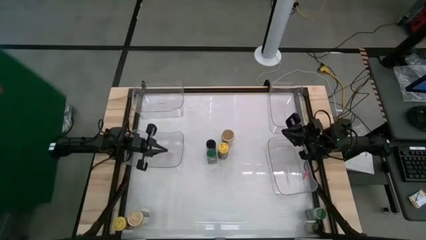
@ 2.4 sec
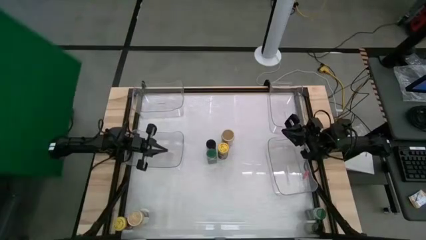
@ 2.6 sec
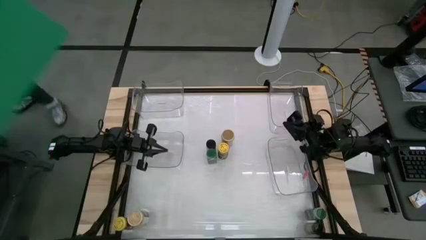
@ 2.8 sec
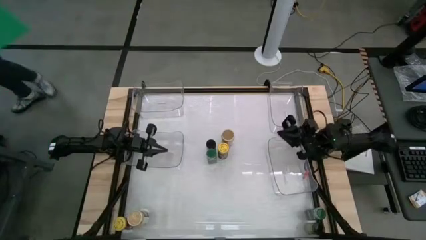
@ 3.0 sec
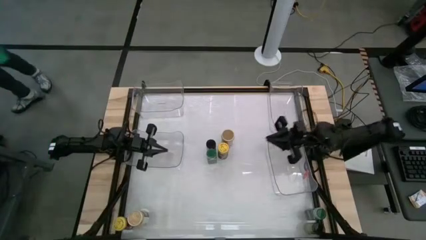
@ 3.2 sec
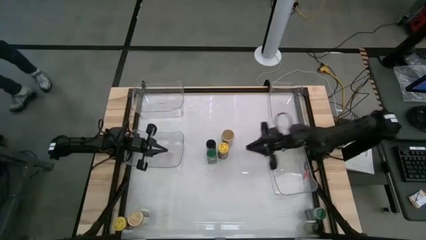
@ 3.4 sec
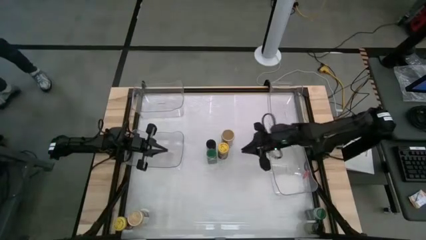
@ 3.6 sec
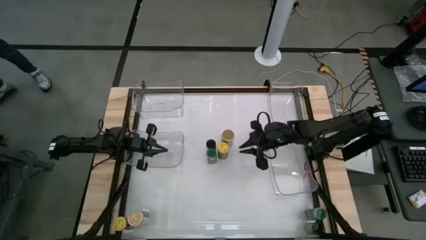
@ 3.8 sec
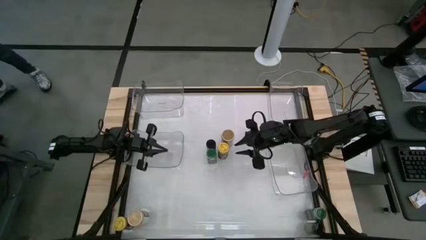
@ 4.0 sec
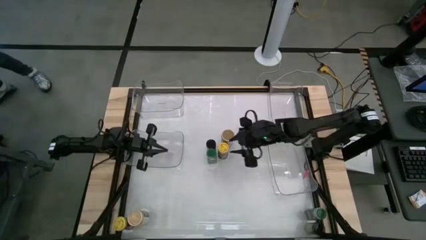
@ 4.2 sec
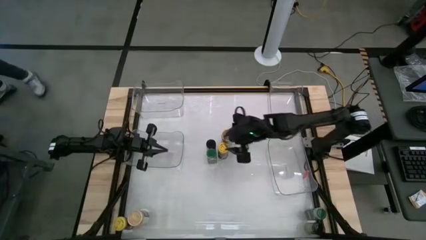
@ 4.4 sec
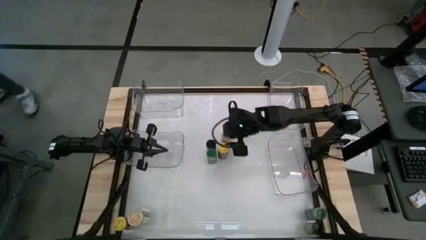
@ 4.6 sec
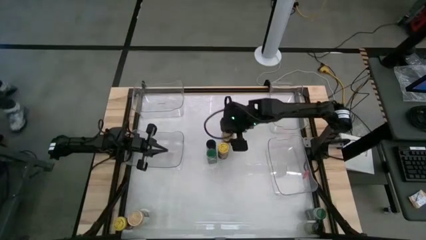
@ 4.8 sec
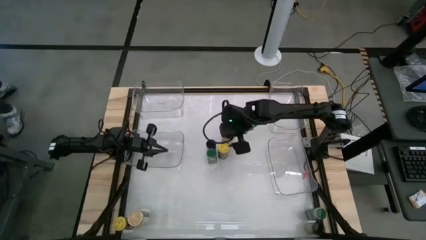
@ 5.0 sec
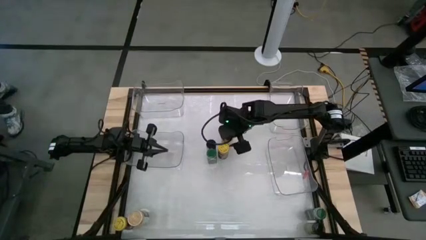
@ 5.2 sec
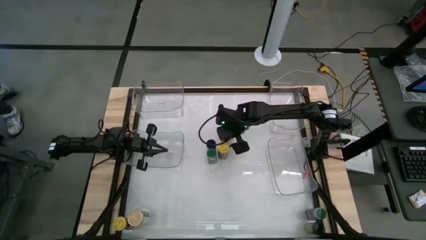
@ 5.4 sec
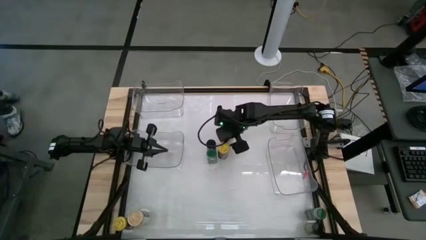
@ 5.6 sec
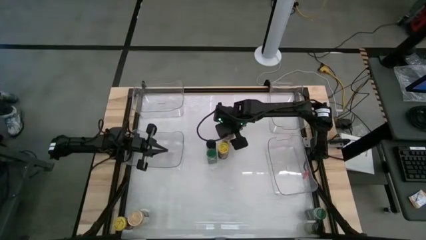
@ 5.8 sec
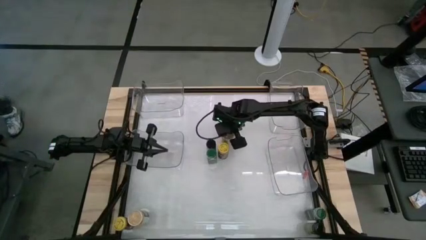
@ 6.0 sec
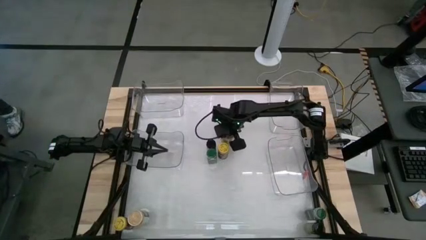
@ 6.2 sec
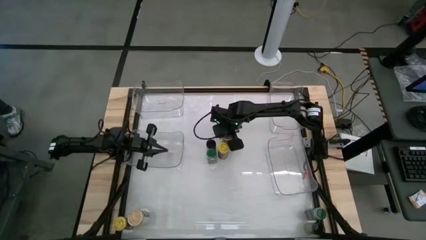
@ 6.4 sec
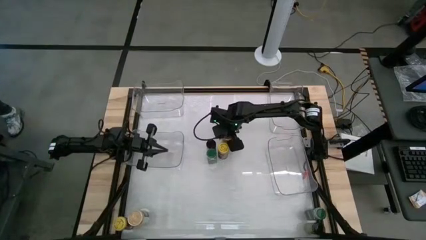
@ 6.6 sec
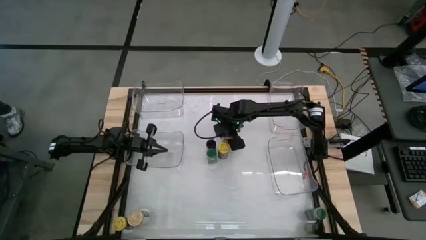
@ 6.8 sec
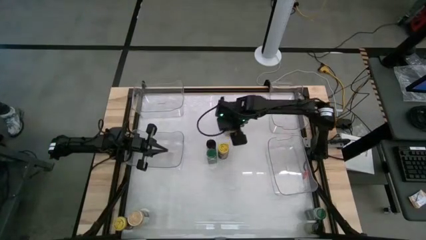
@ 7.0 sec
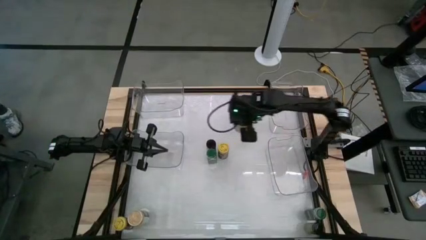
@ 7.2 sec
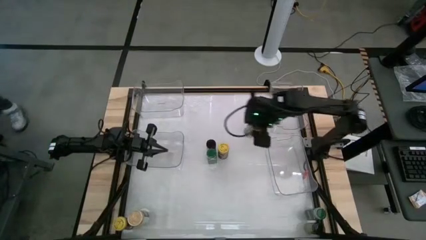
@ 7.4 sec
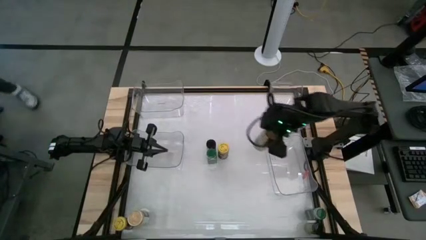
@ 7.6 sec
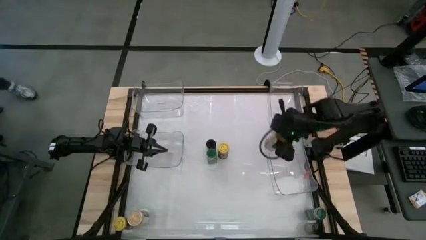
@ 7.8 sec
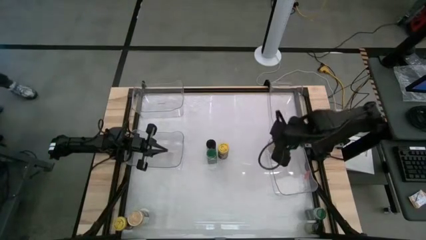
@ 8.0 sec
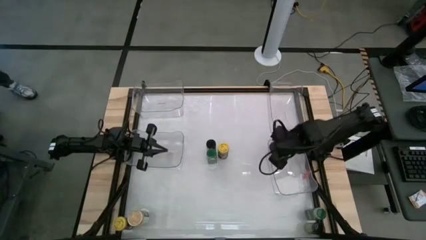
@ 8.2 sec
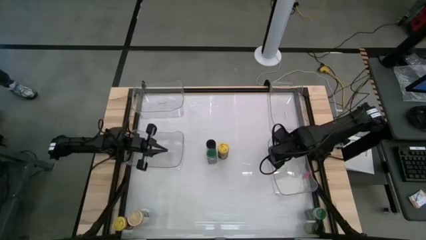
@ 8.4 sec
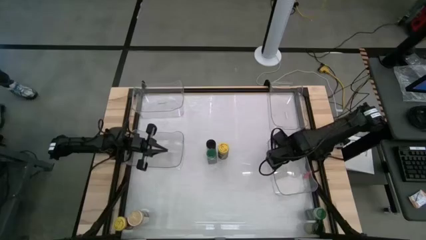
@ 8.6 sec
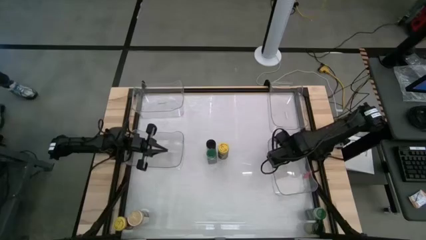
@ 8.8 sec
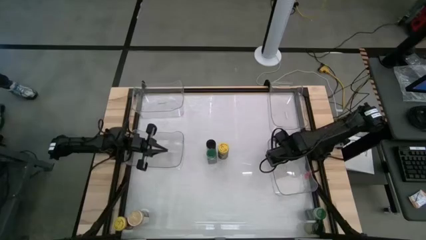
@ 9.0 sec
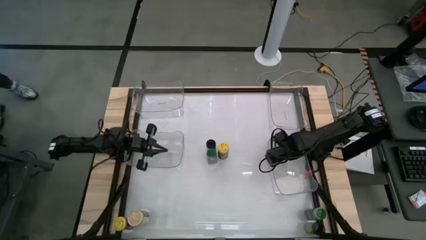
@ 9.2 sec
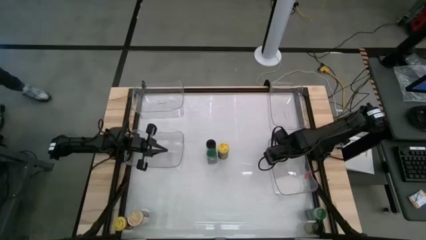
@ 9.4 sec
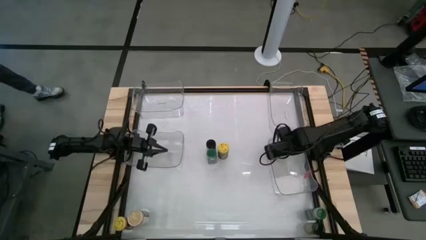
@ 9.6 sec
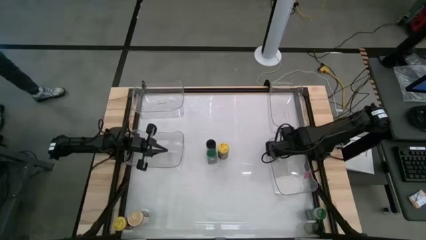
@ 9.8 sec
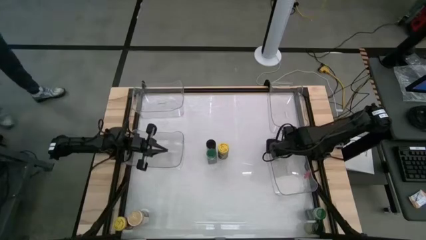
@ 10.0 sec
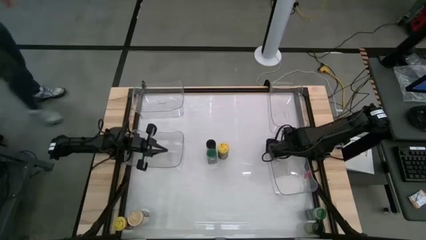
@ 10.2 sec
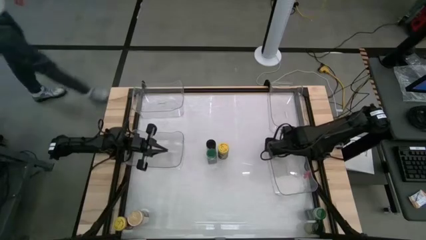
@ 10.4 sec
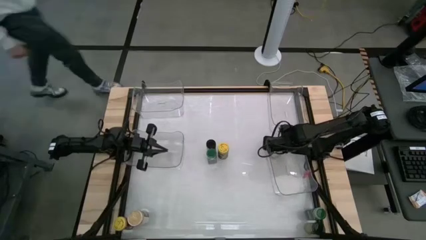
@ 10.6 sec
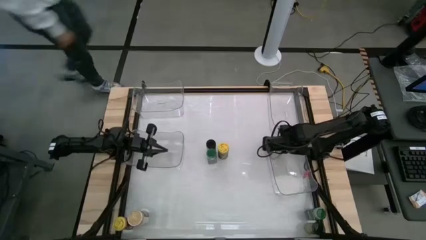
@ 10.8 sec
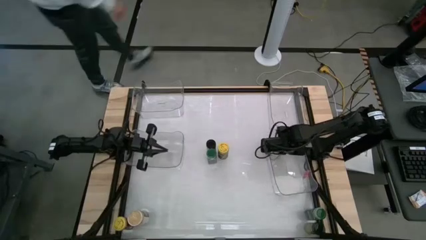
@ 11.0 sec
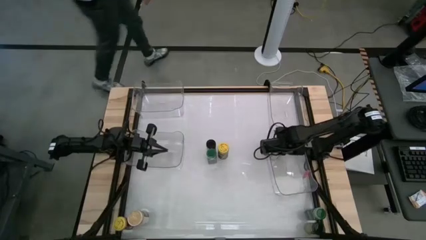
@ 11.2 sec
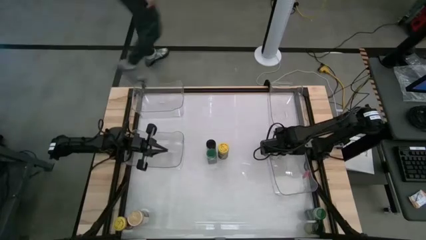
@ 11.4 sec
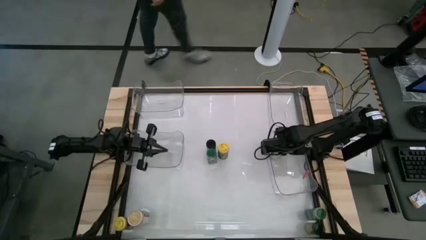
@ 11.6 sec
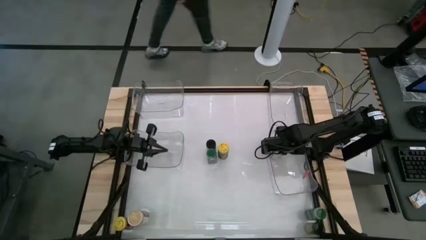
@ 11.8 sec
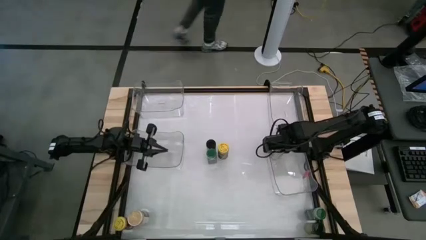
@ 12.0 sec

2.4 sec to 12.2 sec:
Task: Sort spices by type
Put the top gold spice bottle into the bottom right transparent bin

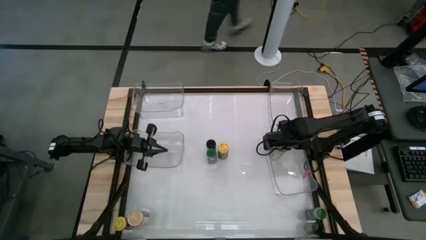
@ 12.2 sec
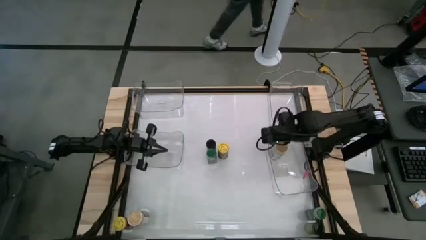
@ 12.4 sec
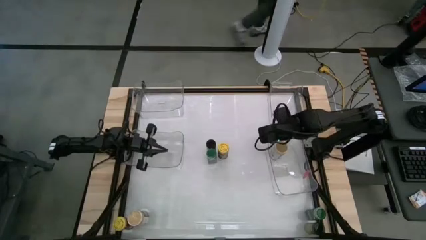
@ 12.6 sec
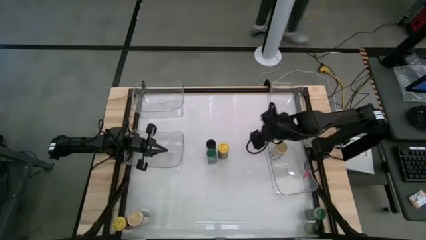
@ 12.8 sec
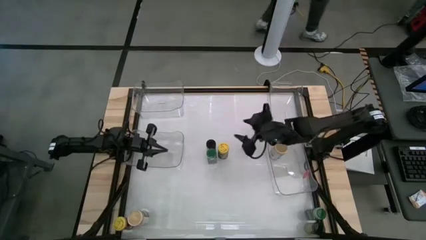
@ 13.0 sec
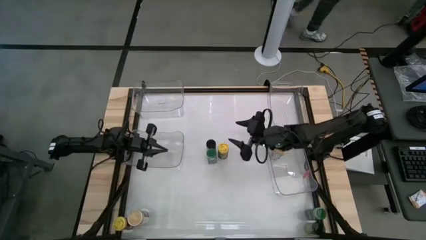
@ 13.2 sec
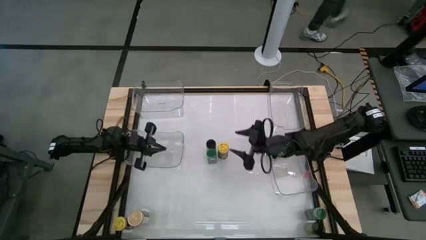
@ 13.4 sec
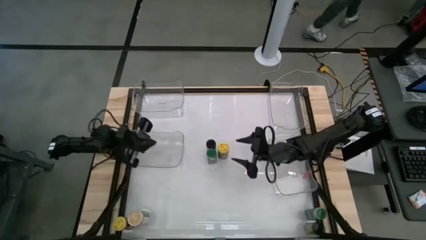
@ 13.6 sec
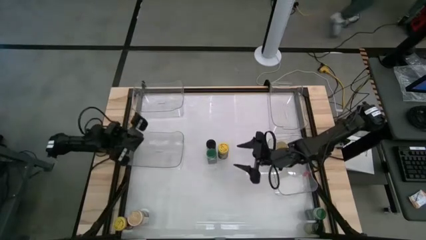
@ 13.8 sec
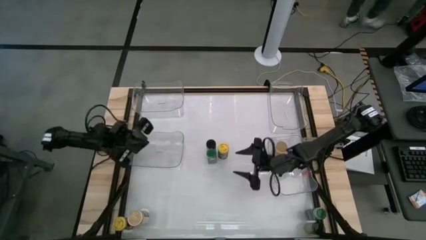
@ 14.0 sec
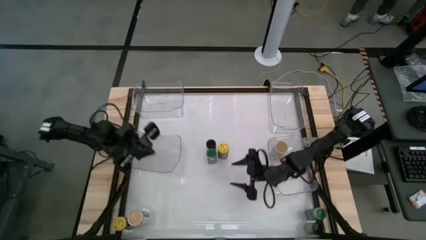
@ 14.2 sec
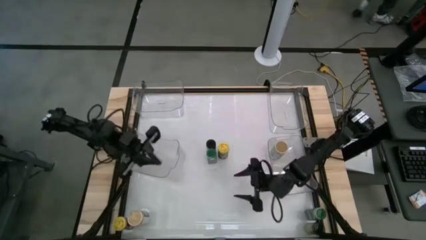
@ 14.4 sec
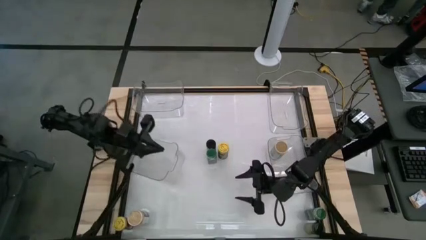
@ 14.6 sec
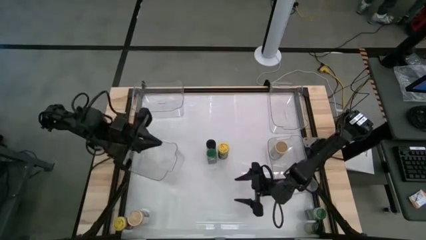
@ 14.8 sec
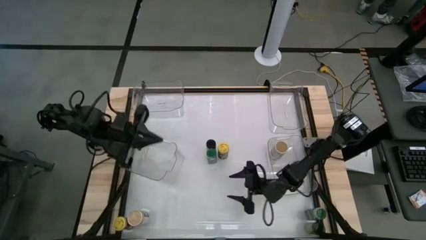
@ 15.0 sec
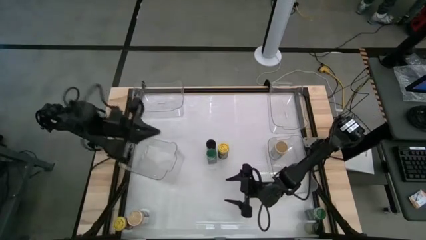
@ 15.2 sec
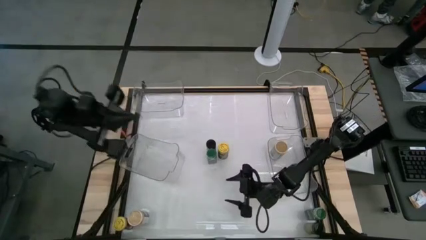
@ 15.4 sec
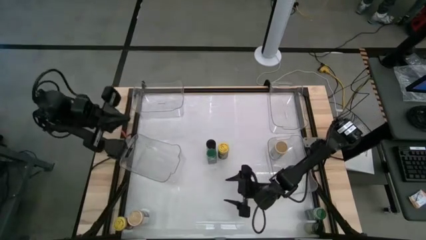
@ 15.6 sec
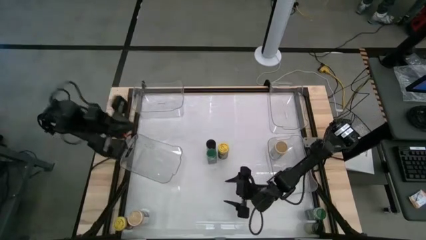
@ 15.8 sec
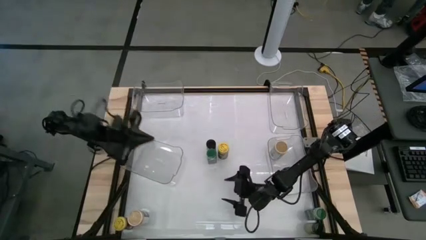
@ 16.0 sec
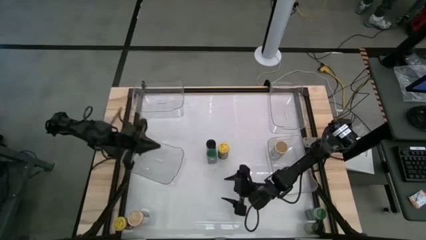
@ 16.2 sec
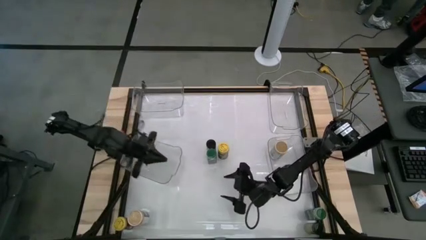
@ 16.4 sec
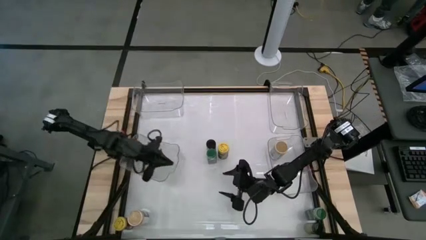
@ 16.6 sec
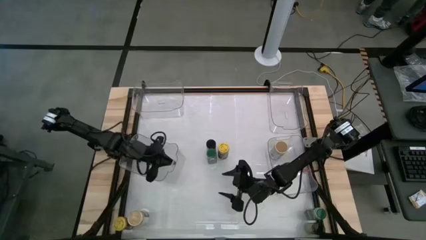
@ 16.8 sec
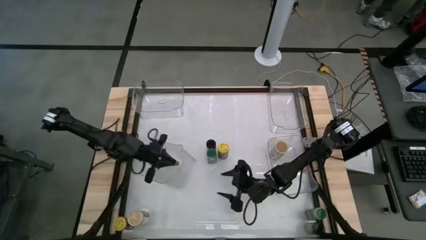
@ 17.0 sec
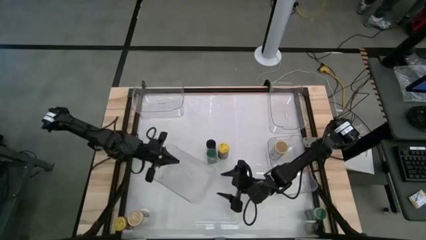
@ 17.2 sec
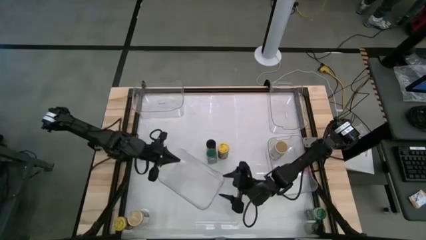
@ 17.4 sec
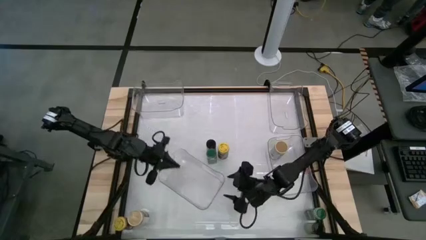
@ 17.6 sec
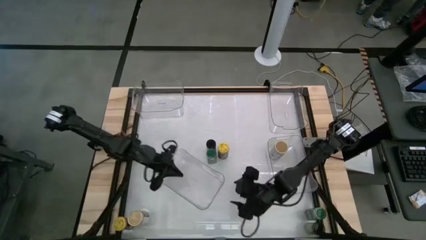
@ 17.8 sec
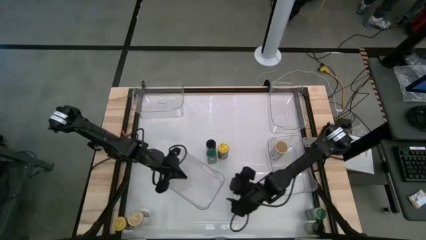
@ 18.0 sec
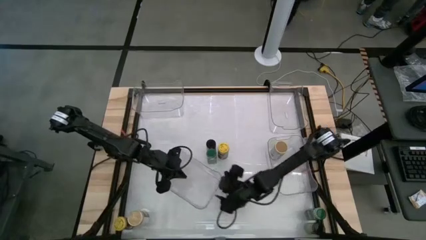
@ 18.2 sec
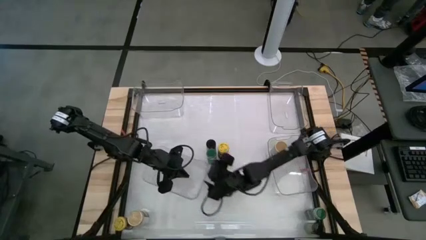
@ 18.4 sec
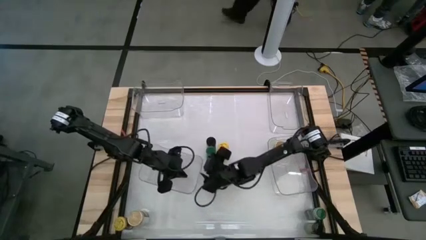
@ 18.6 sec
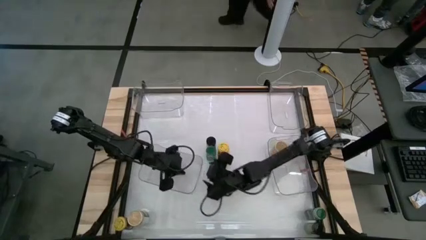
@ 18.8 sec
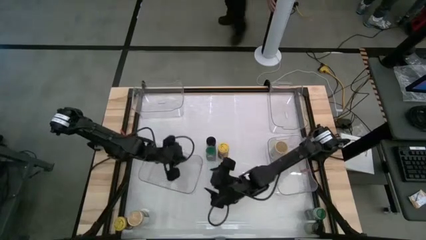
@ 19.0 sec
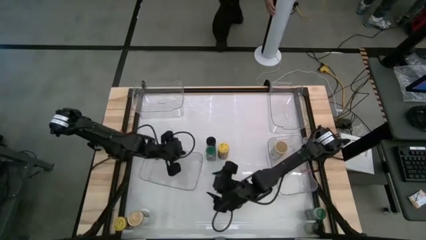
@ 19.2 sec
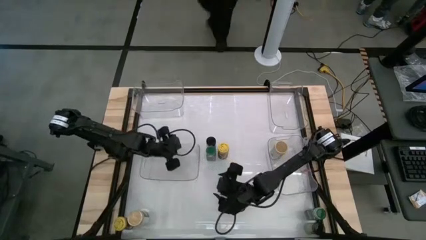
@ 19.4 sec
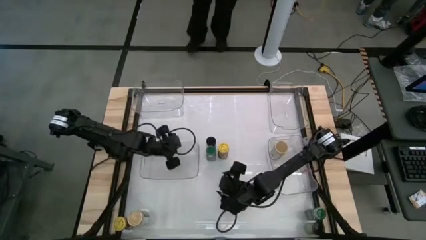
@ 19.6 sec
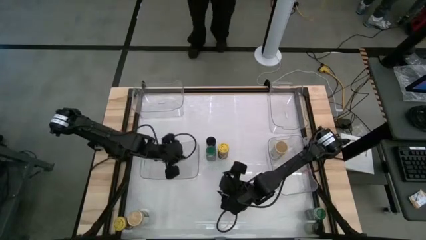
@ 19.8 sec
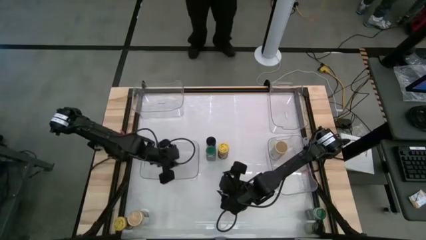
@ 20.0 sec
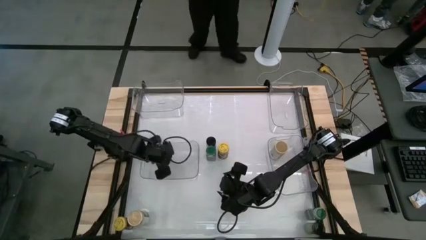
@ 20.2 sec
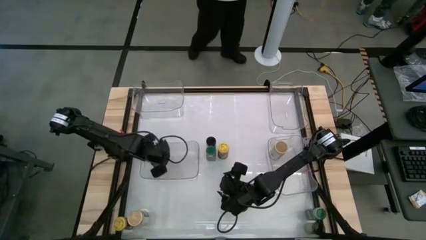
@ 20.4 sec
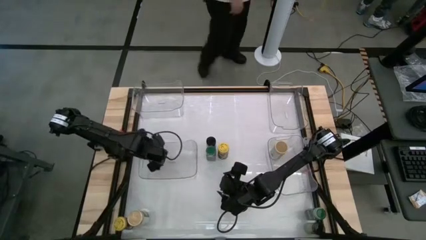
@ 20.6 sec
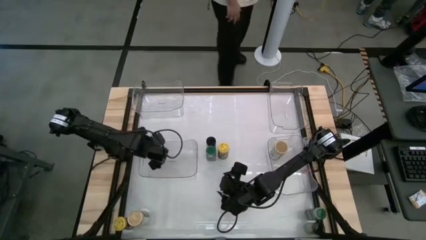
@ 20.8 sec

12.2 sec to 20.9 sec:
Adjust the bottom left transparent bin
